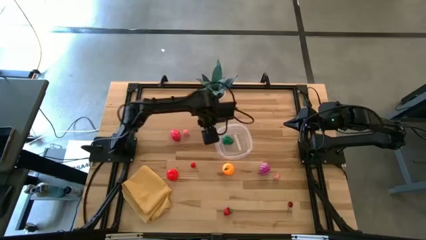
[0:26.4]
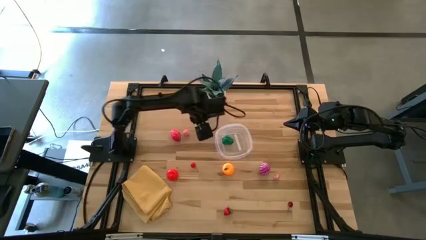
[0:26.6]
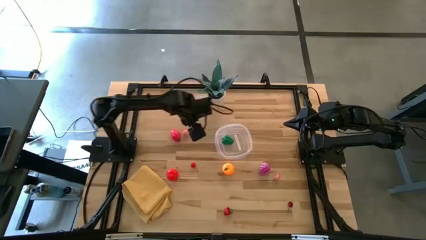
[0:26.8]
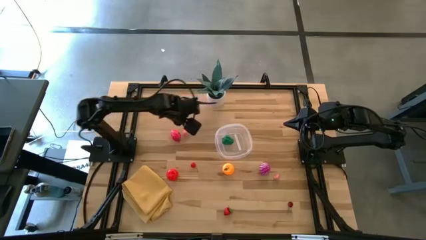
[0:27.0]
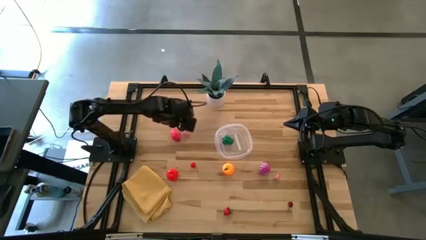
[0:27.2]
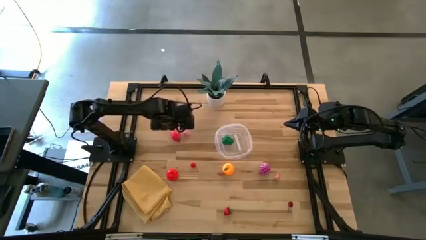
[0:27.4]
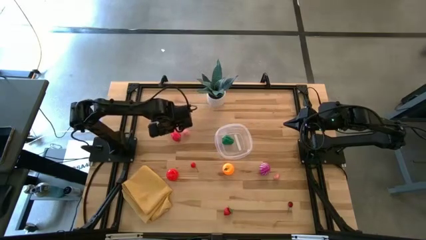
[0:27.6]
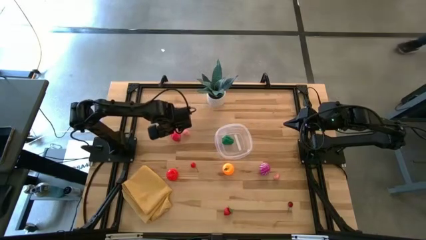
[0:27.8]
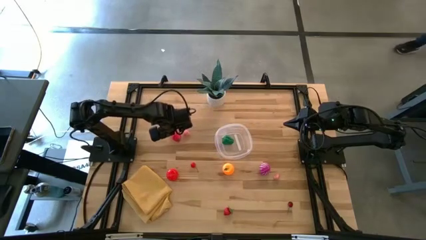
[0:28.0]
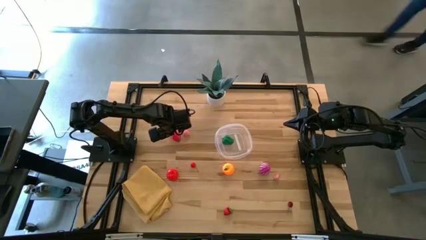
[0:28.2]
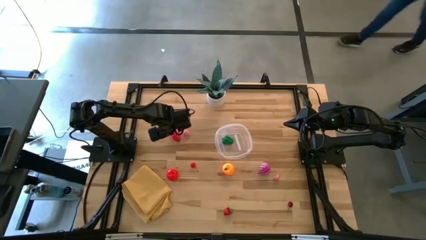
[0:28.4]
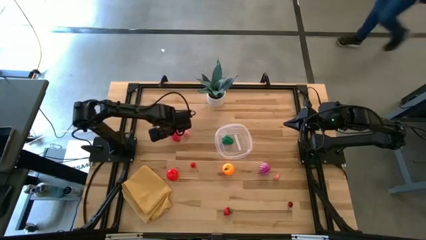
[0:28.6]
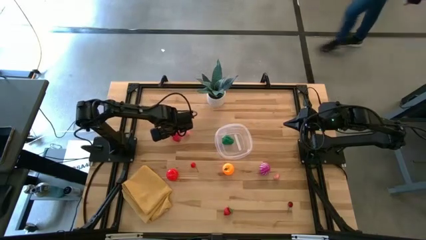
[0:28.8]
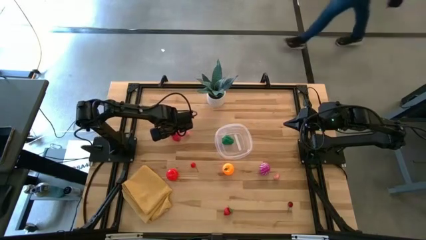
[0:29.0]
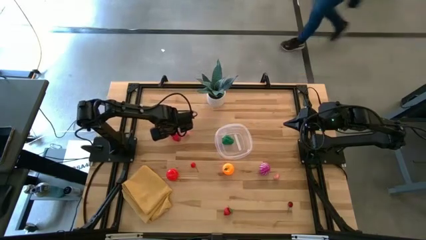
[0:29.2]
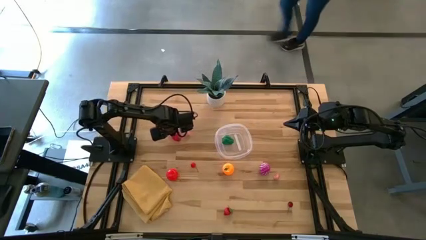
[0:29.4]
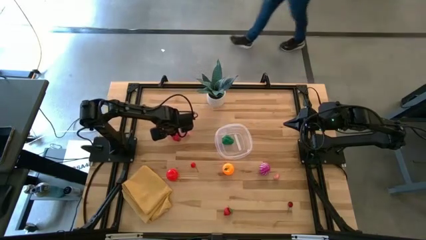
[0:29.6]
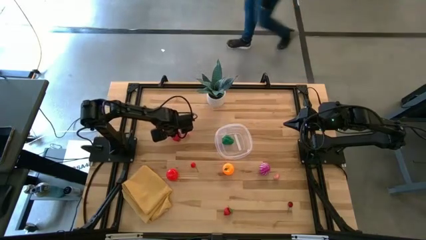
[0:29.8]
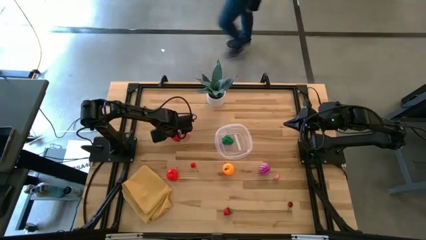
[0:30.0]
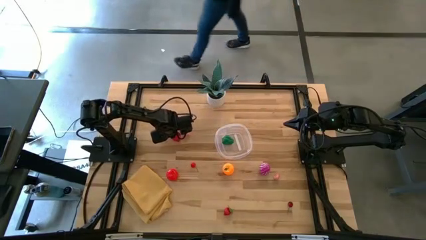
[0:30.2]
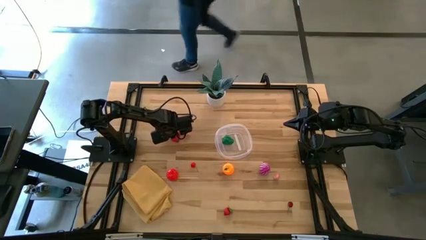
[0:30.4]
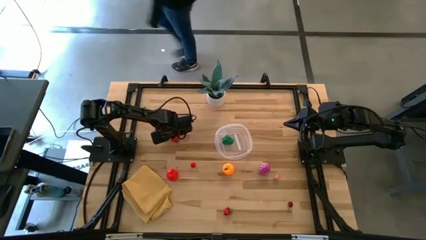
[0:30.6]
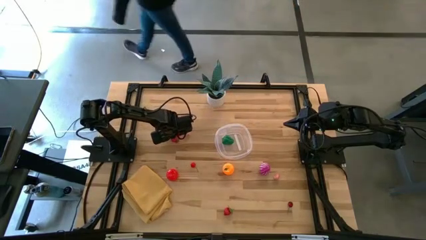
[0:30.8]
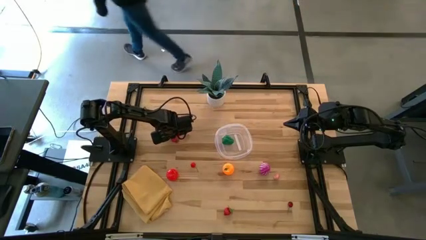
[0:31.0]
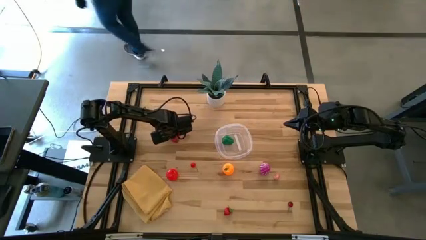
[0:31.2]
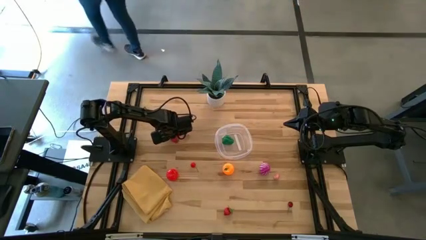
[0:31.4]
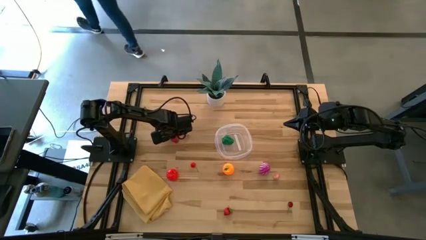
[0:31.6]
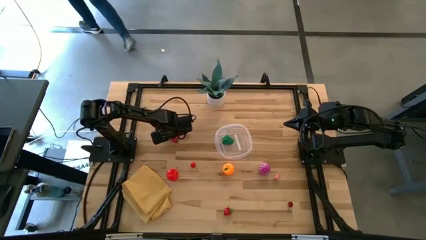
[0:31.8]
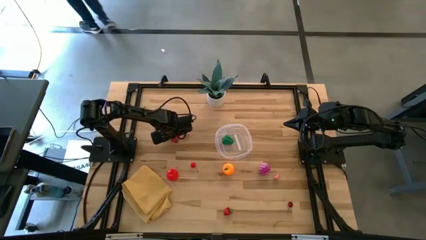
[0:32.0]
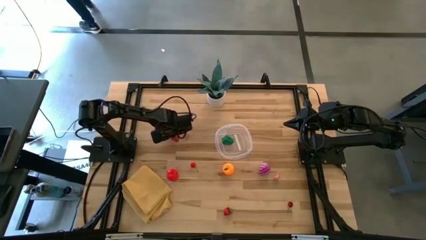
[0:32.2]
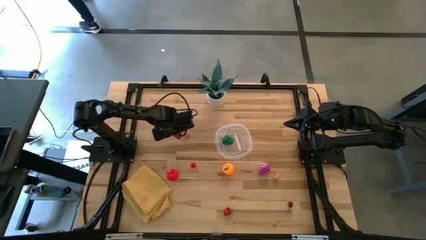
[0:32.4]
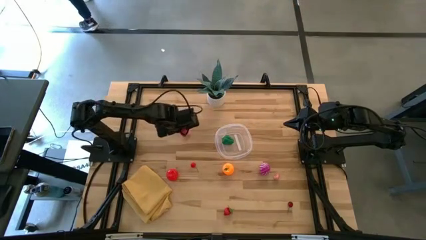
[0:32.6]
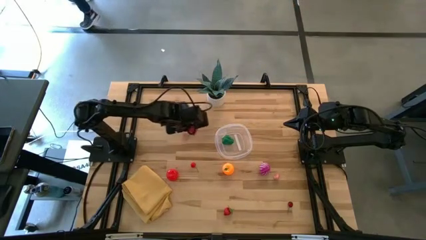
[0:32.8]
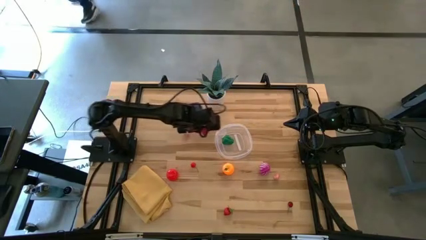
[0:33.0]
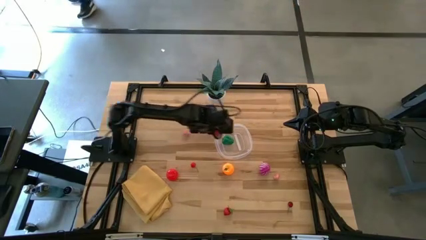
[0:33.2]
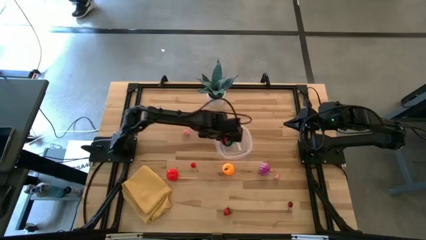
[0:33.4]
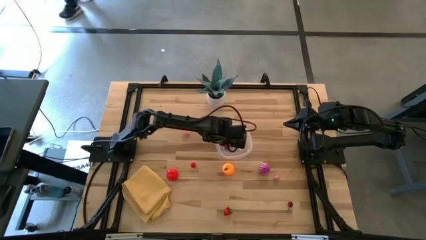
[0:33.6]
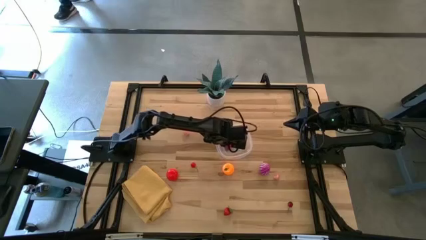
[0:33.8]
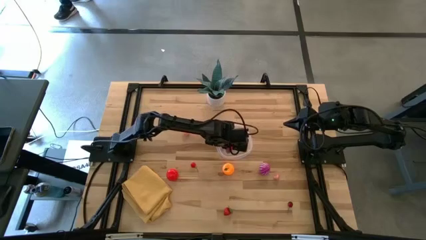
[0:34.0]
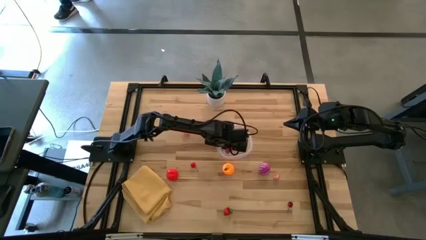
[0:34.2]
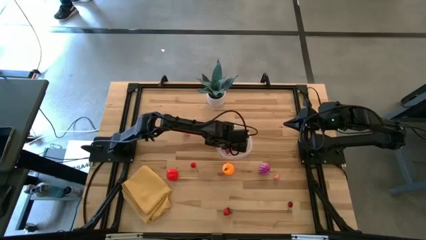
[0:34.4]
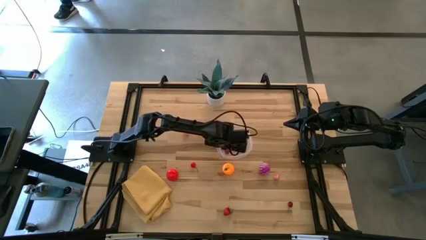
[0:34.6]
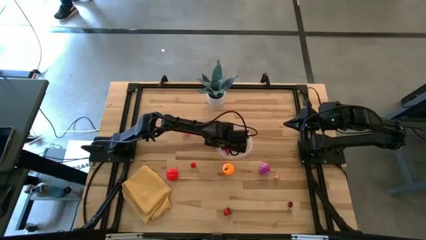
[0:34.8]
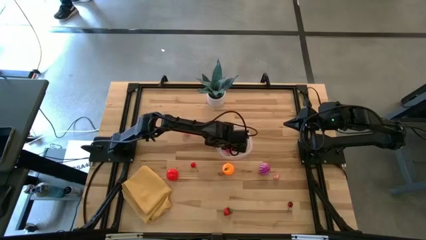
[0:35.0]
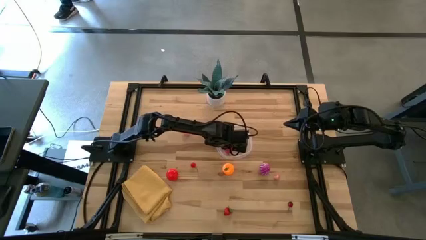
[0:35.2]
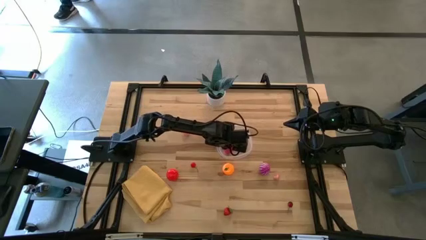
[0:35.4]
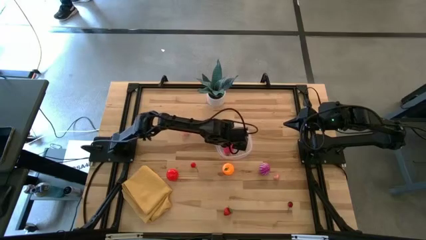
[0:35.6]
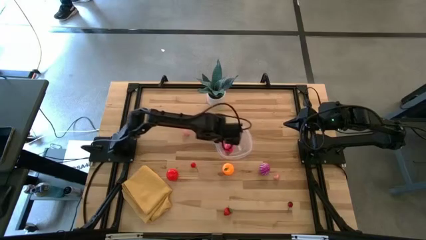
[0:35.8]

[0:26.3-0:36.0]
Task: Pick and placing Produce into tupperware
Put the dragon fruit into the transparent bin

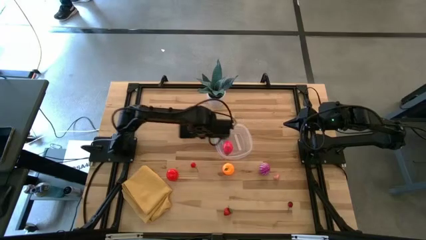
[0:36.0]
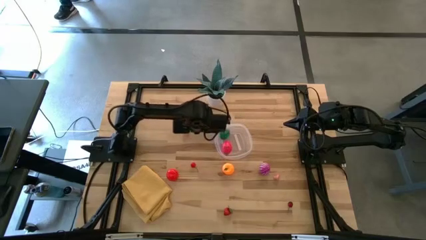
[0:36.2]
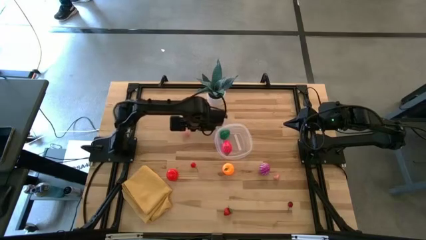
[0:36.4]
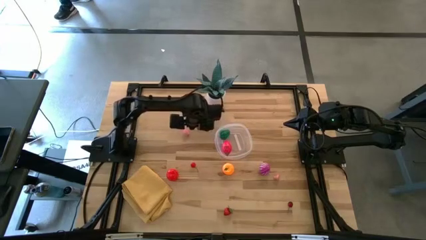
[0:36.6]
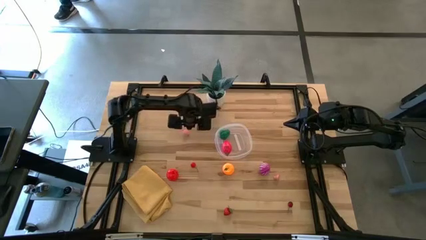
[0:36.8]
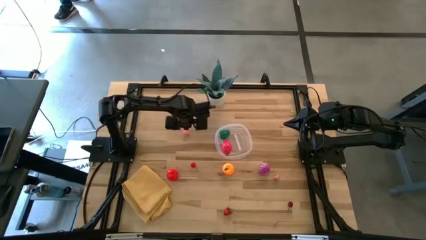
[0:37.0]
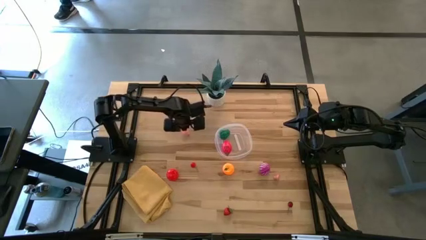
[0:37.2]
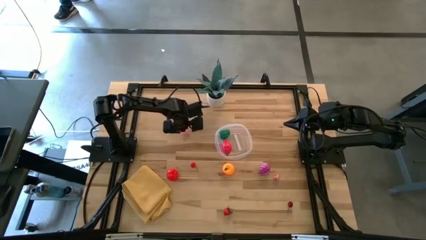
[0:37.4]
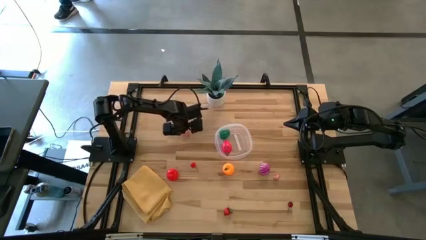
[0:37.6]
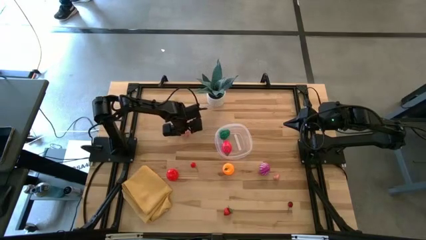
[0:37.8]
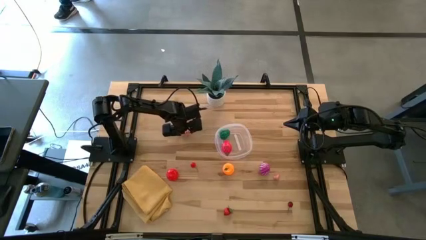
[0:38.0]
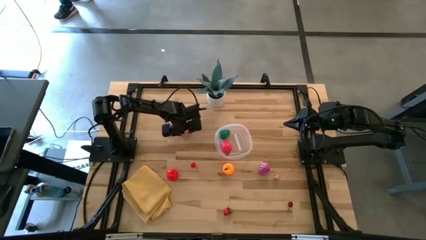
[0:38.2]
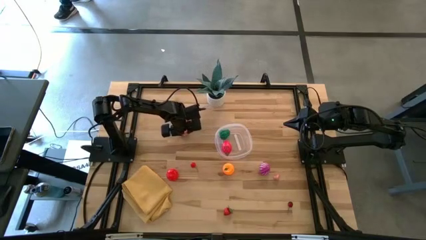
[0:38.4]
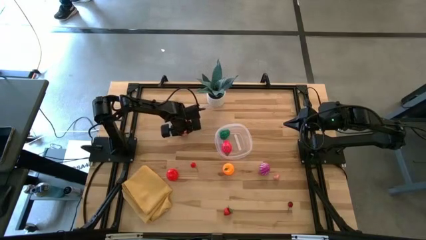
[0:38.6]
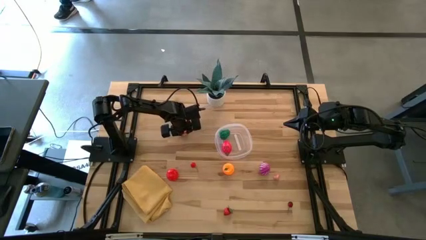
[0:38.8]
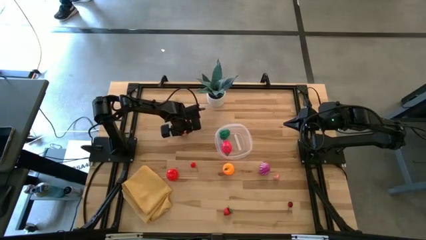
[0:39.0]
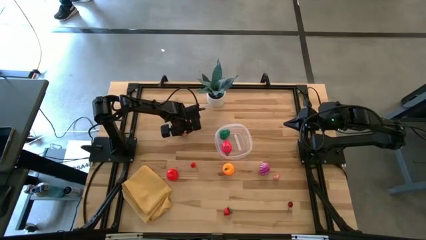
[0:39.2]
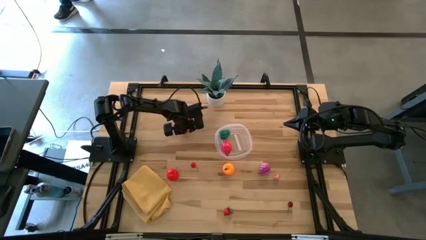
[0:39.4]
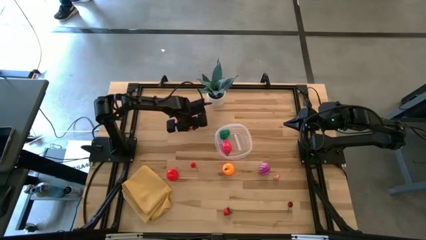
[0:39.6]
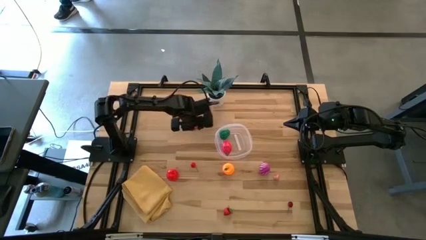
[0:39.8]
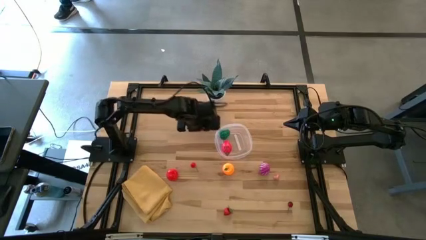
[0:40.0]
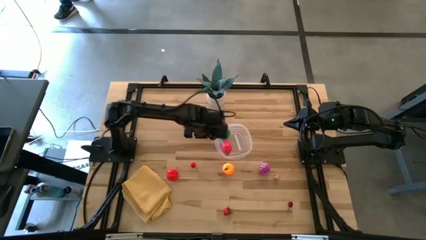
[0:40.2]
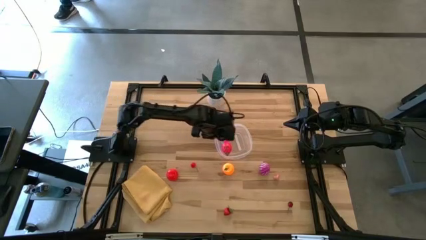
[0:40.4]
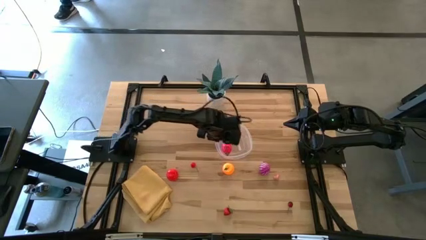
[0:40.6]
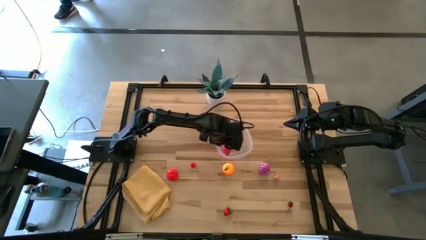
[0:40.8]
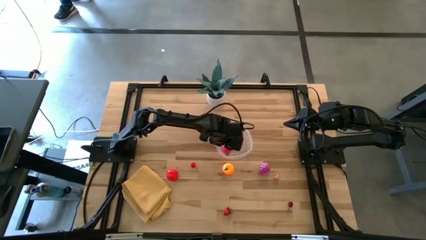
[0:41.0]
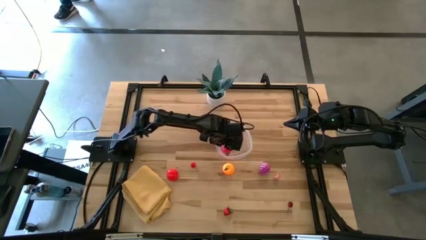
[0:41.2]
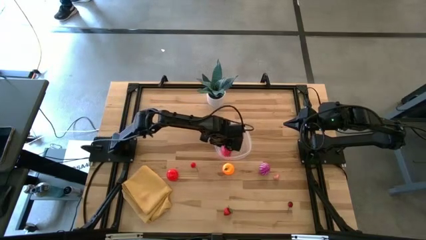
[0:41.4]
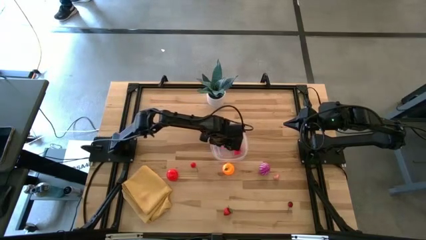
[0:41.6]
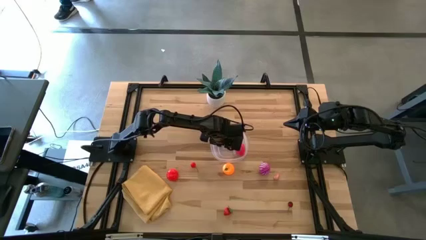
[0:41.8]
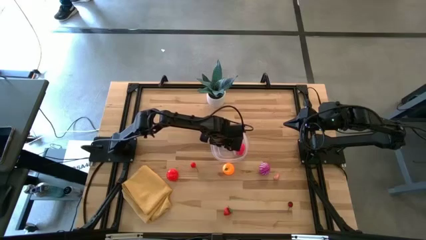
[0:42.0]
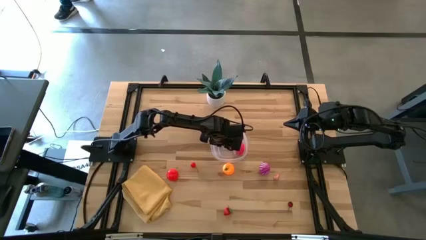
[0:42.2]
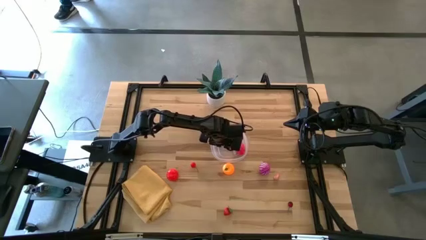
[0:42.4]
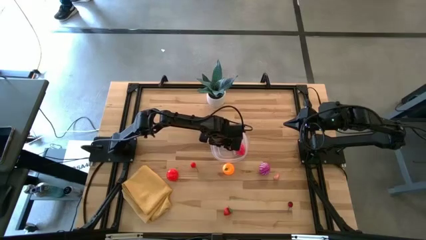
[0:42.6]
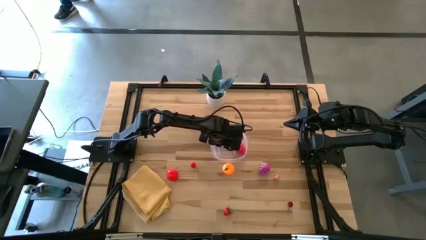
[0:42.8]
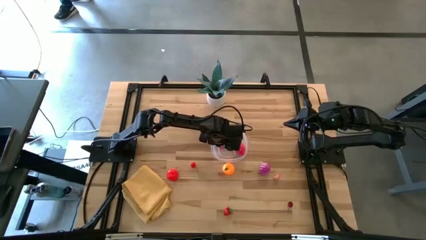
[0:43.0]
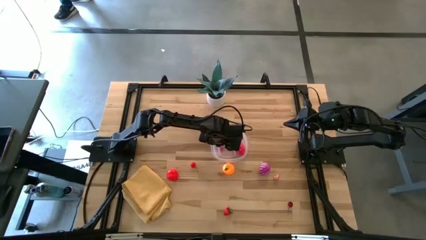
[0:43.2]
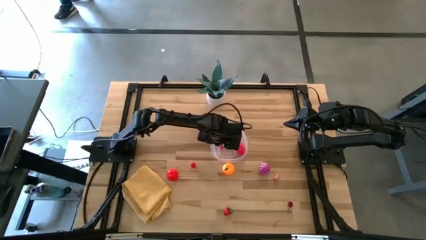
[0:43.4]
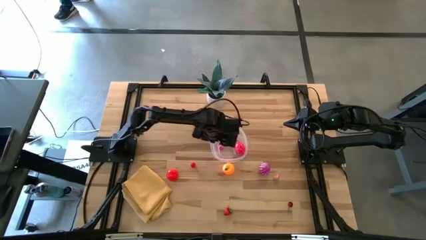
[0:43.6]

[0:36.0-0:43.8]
Put the peach into the transparent bin
